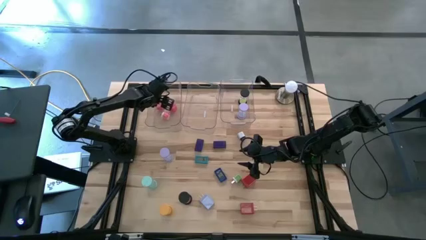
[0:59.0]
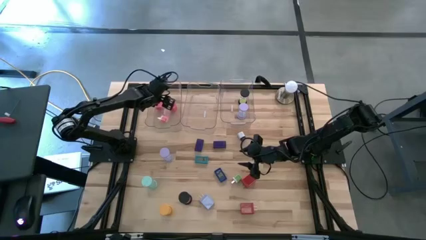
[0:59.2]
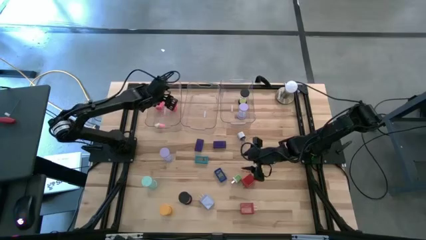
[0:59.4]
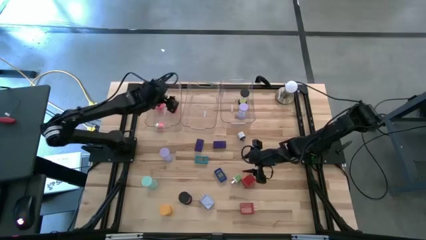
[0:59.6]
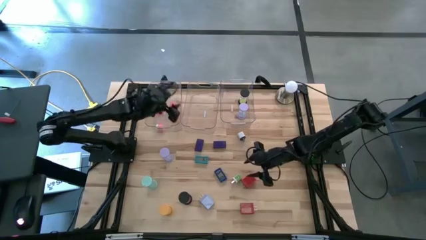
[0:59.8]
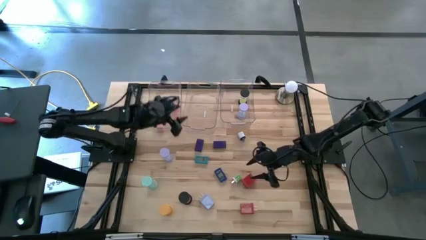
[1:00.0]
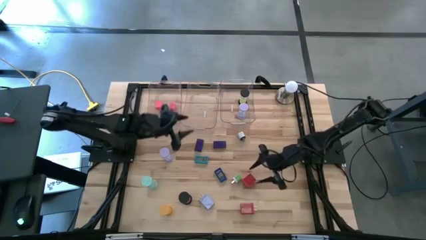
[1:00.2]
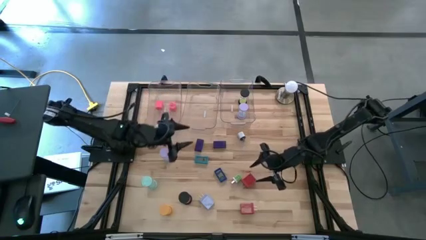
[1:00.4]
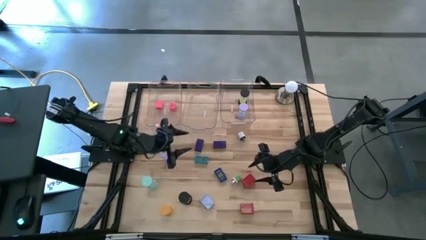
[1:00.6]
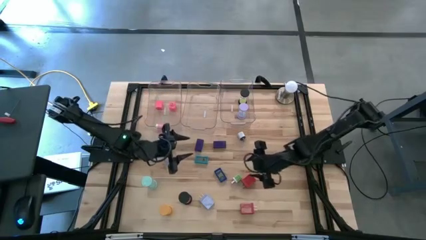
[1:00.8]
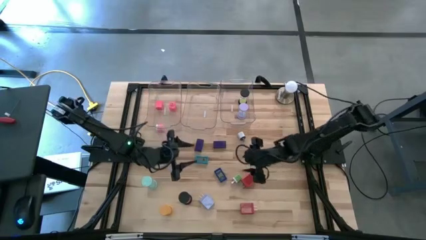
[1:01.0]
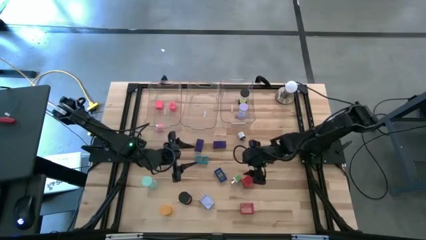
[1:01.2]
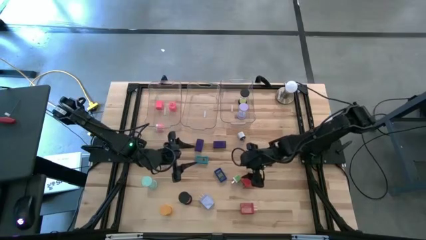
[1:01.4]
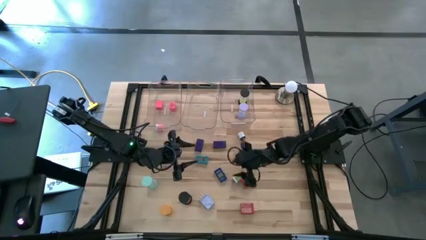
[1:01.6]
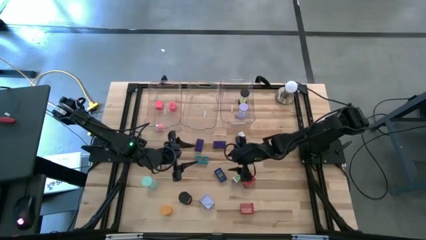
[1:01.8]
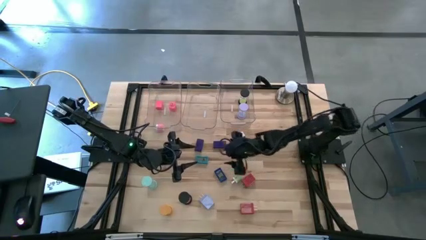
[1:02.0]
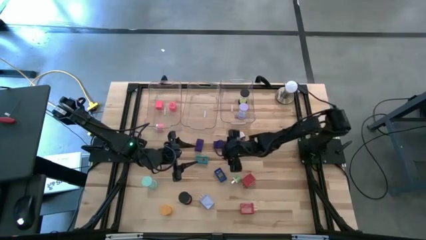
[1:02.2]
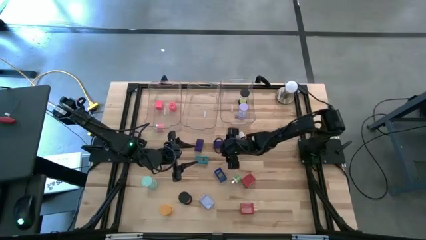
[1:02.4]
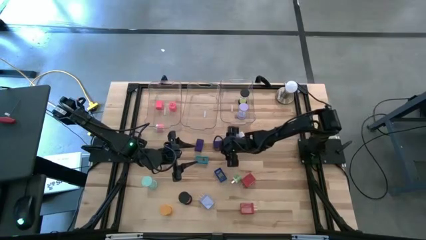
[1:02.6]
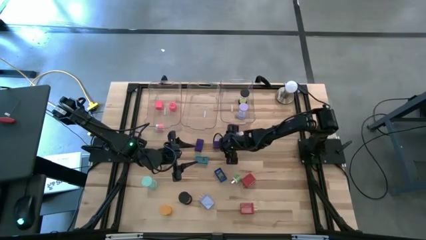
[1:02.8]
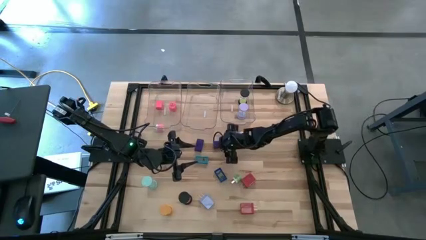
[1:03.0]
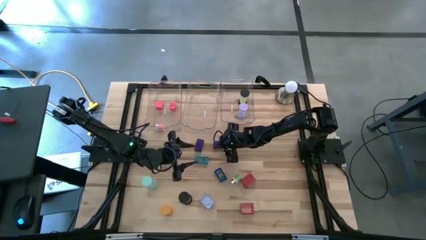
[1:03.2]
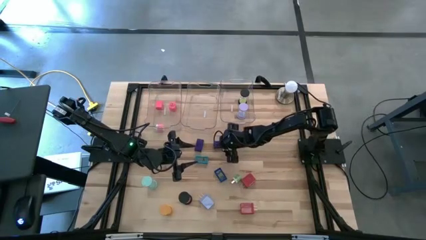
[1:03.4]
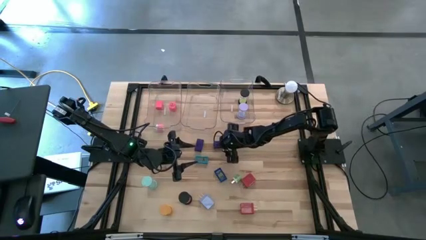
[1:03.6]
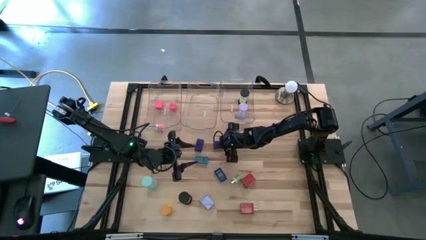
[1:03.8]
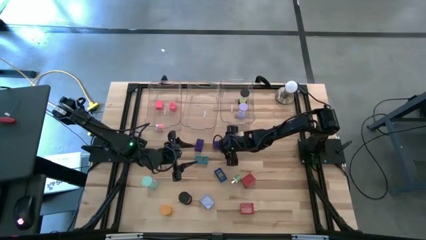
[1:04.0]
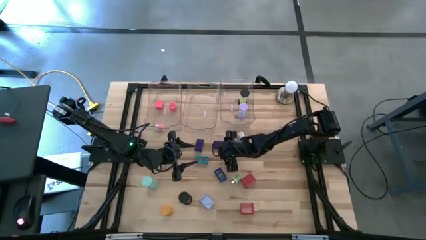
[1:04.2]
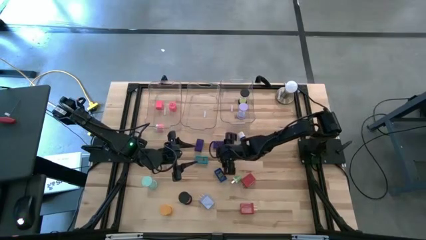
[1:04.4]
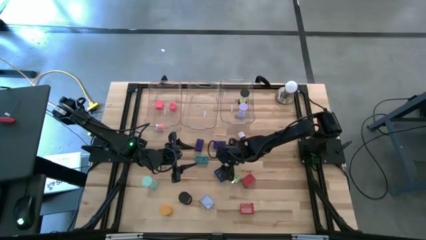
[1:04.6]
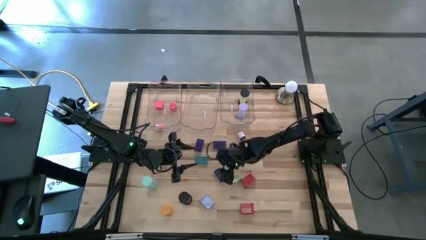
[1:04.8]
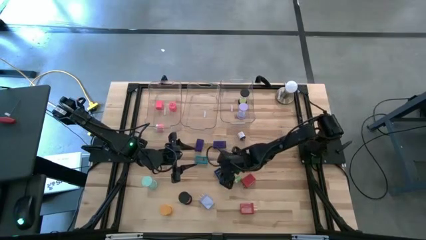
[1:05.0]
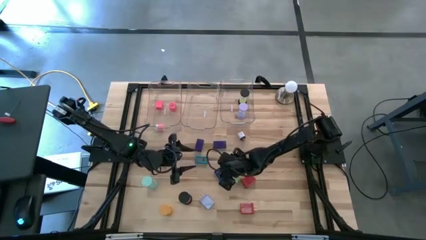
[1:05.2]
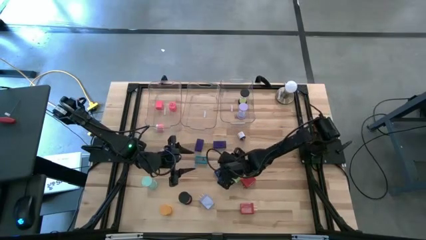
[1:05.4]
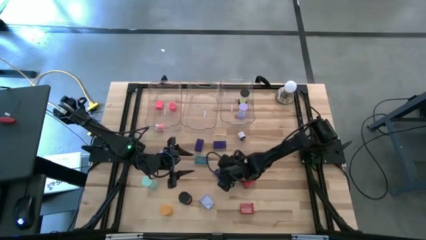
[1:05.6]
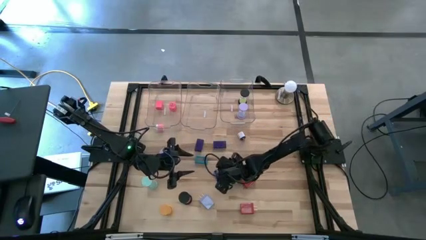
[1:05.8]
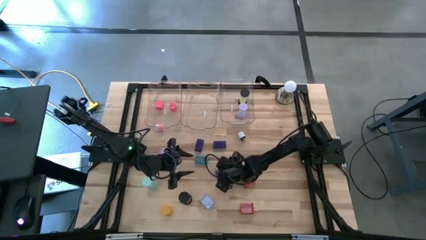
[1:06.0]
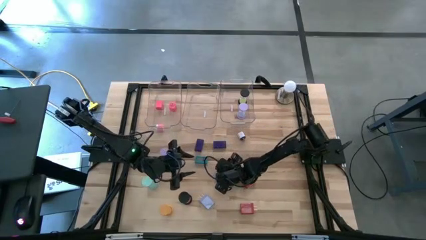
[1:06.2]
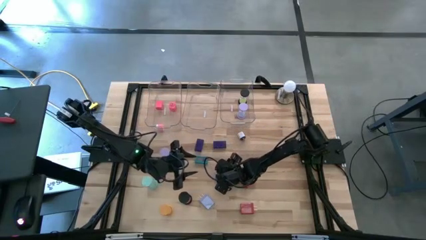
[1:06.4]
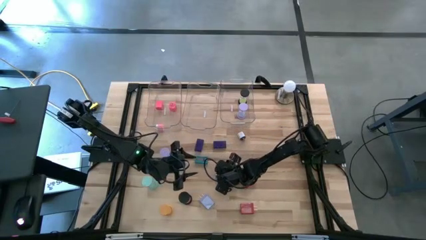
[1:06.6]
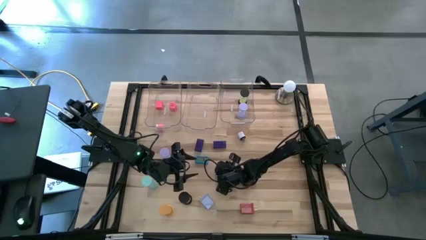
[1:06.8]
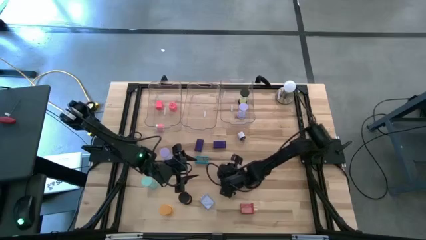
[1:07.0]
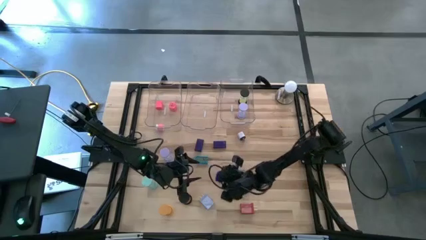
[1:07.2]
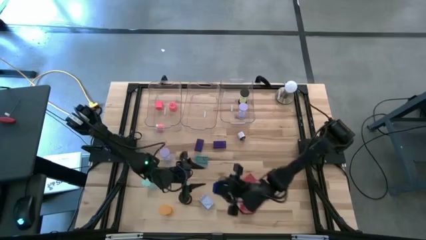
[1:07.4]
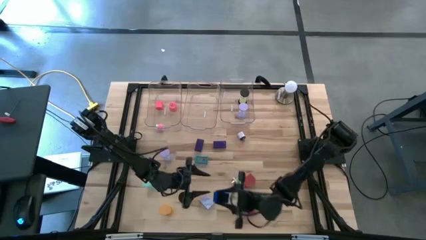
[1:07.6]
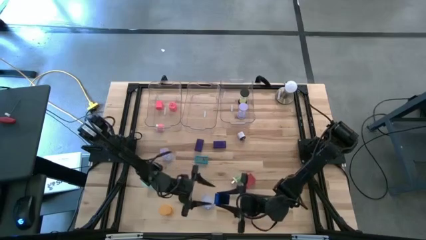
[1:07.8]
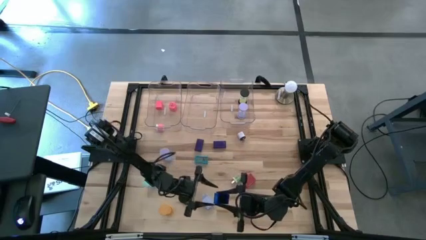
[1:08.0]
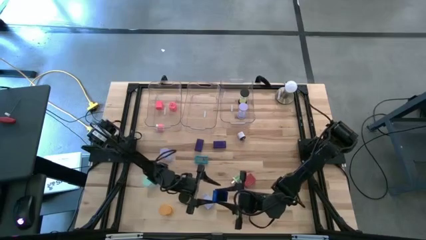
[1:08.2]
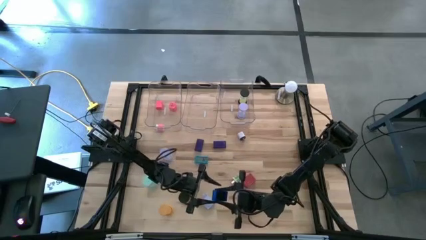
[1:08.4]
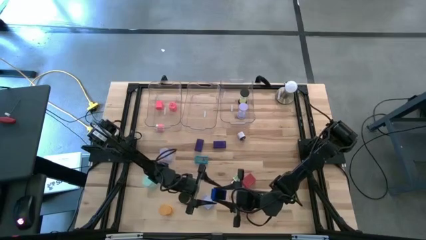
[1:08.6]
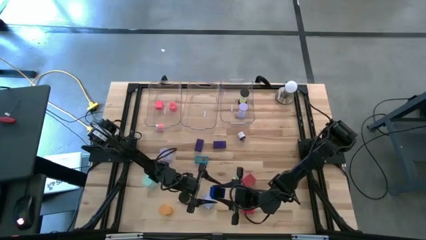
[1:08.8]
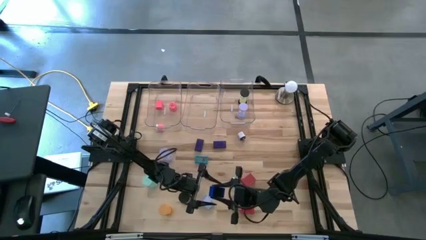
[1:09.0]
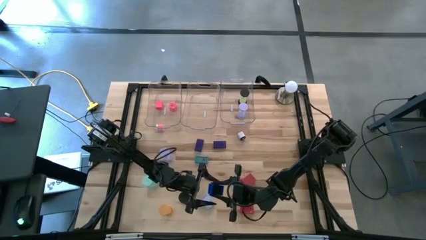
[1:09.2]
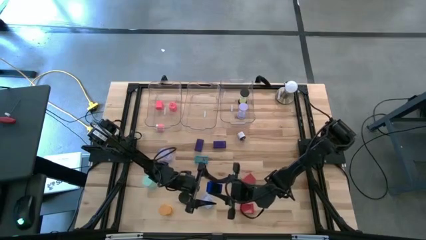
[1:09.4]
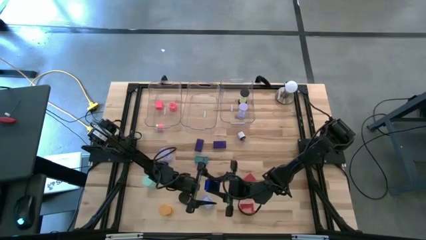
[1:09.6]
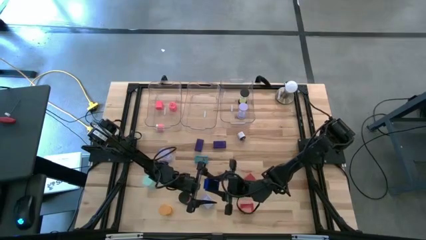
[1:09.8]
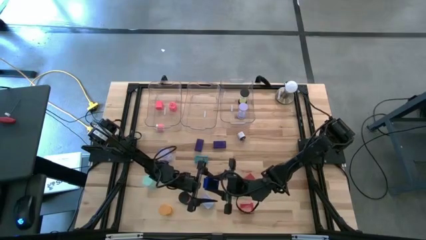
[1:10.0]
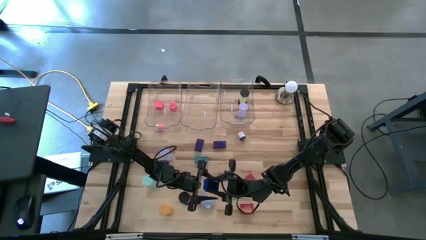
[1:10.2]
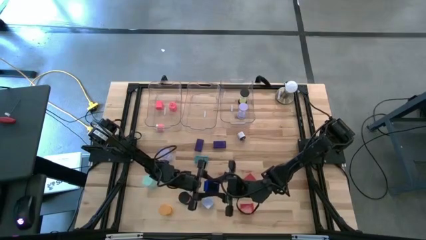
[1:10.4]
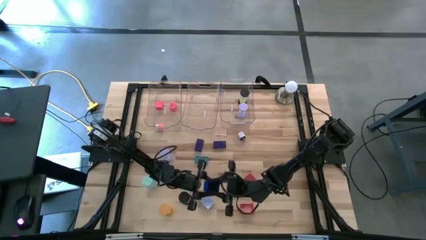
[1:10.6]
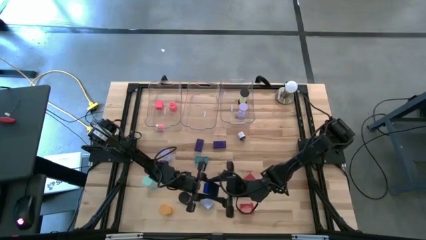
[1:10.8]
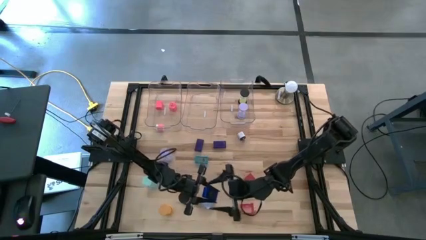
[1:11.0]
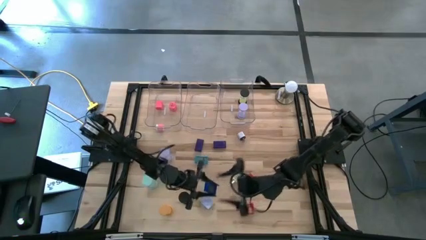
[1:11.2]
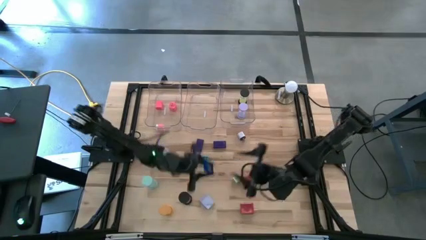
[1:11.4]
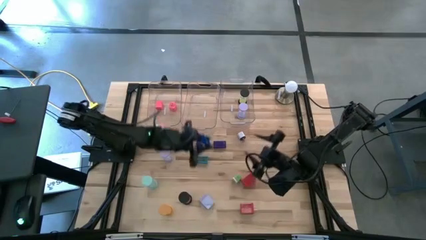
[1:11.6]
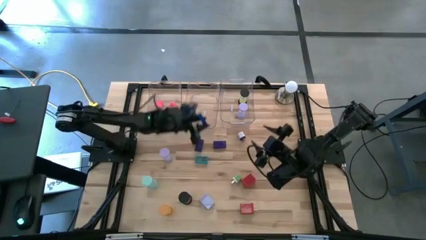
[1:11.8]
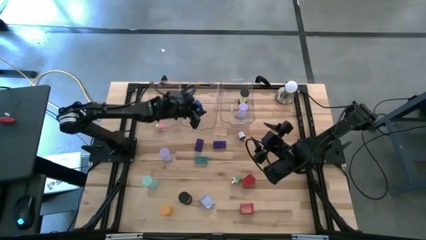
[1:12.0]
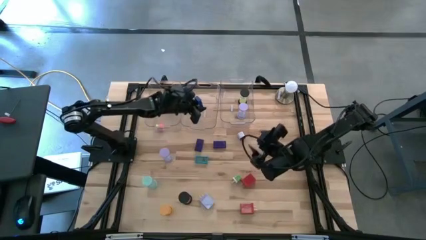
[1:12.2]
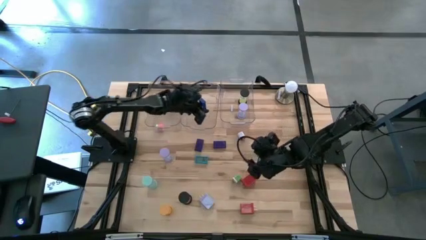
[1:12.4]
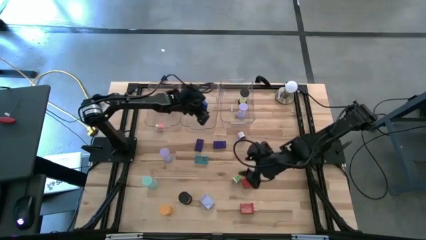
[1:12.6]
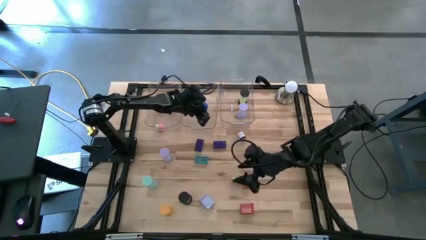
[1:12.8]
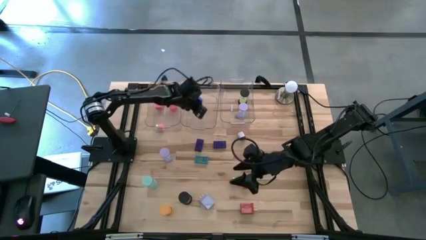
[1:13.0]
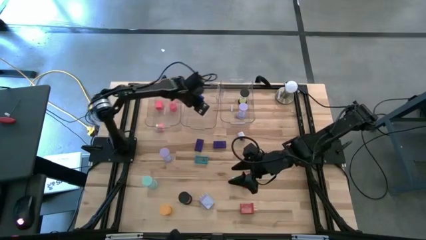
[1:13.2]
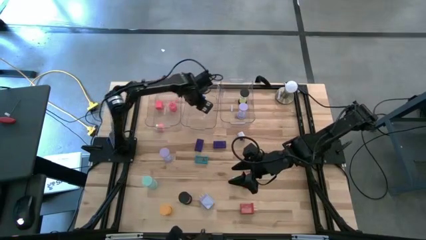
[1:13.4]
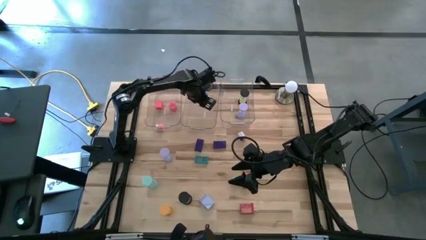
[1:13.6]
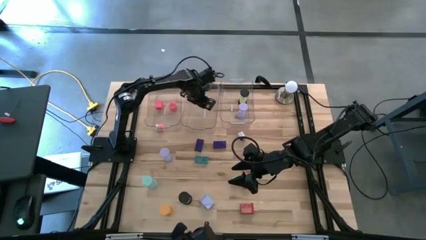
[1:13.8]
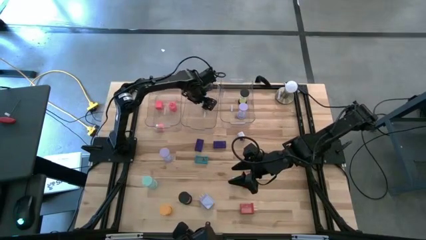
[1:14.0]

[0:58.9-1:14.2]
Task: Pick & Place Office items
Put the dark blue digital clock into the middle transparent bin

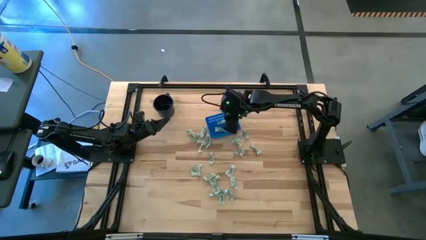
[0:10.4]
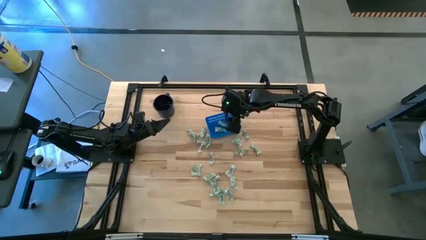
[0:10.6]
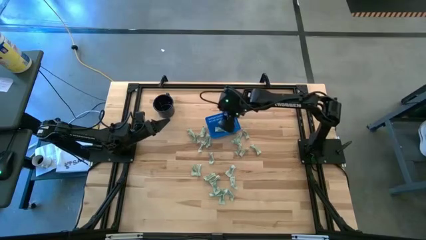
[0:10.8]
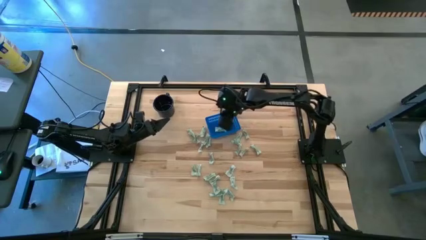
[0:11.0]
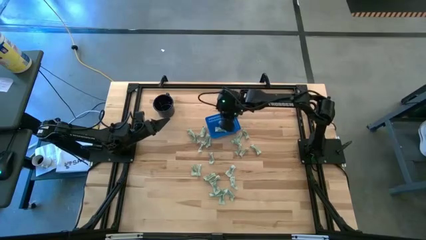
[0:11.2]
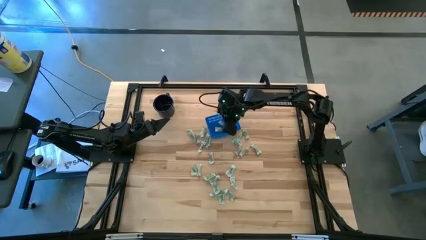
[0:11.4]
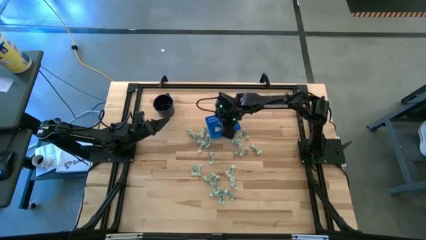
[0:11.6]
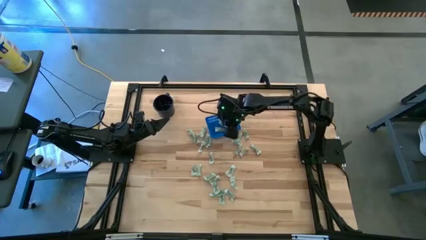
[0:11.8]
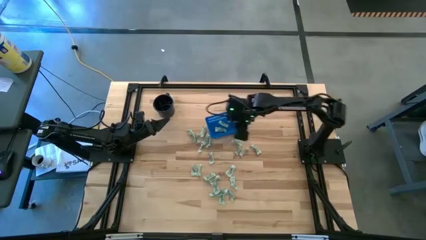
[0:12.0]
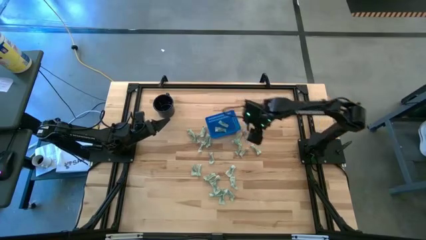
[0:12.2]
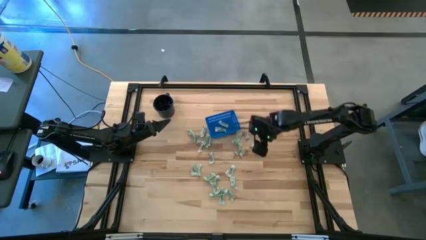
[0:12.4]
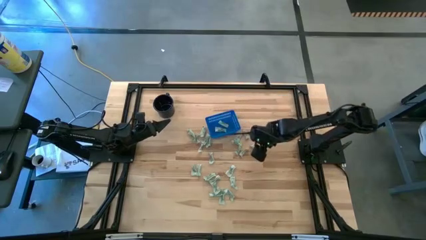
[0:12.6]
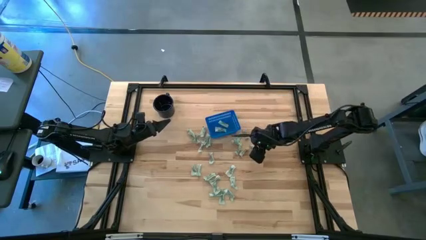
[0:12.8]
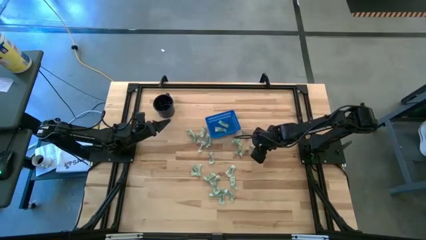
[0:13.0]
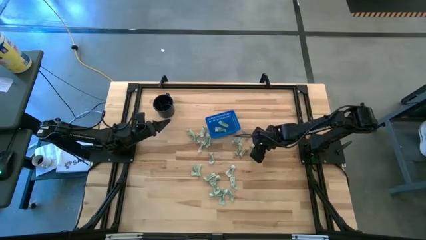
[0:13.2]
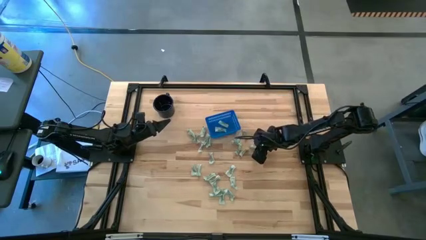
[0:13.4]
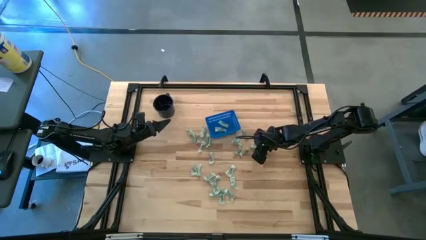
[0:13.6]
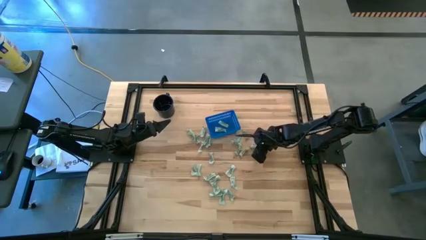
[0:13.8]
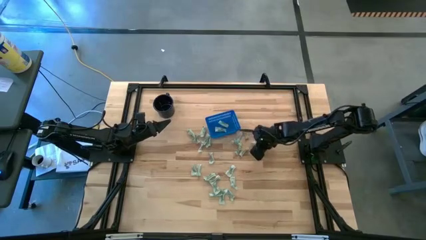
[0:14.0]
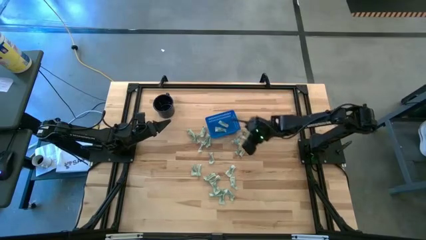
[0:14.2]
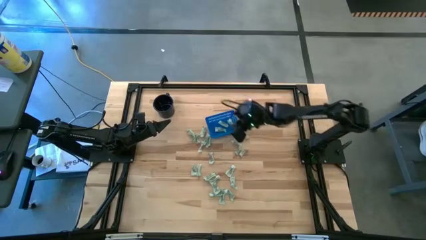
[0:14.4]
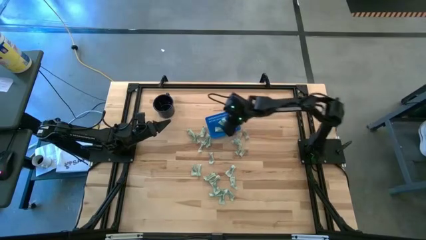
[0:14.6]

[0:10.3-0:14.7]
Task: Pick and place Stevia / Truvia into bins
Put the green stevia packet into the blue bin
